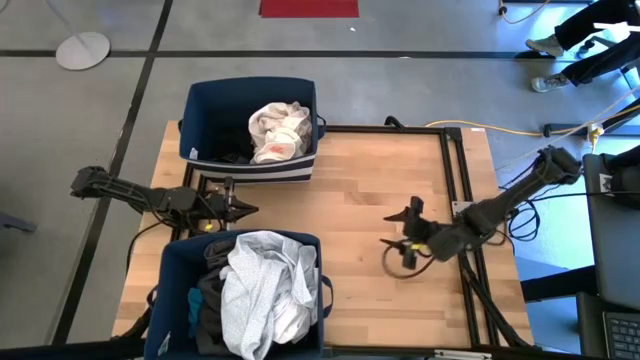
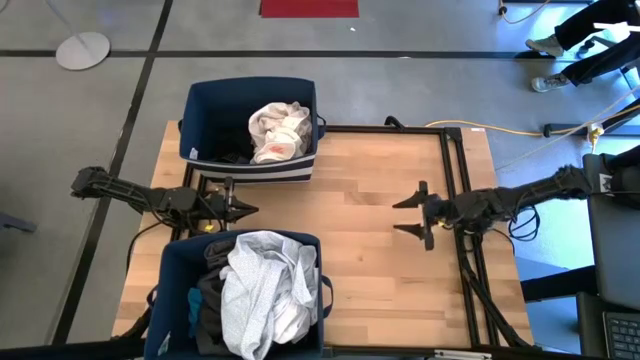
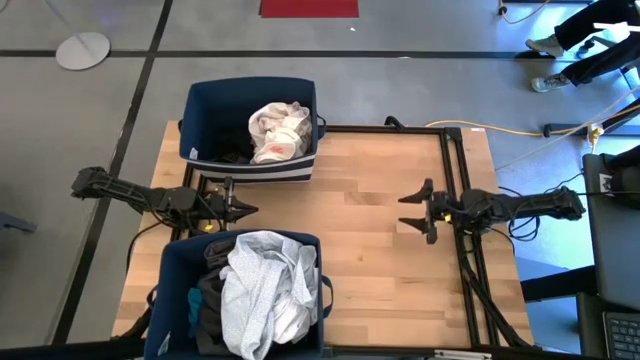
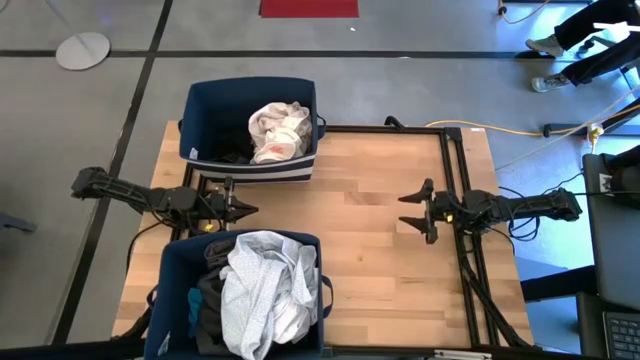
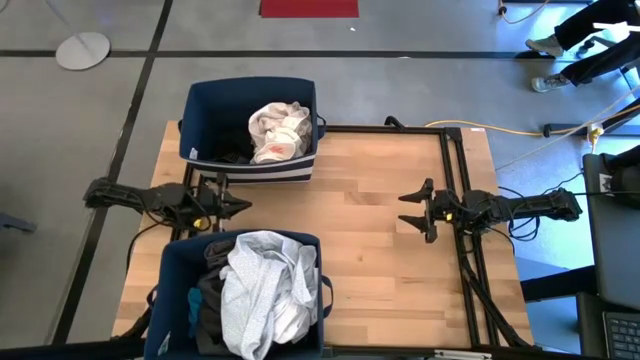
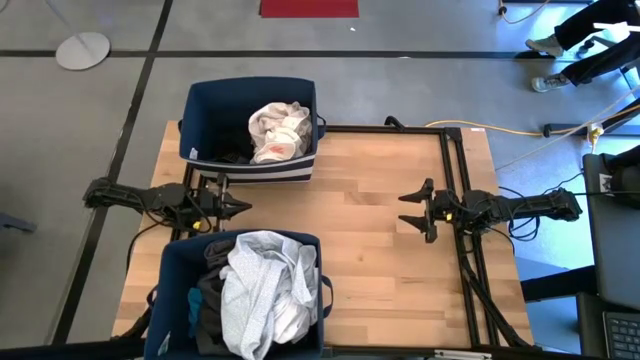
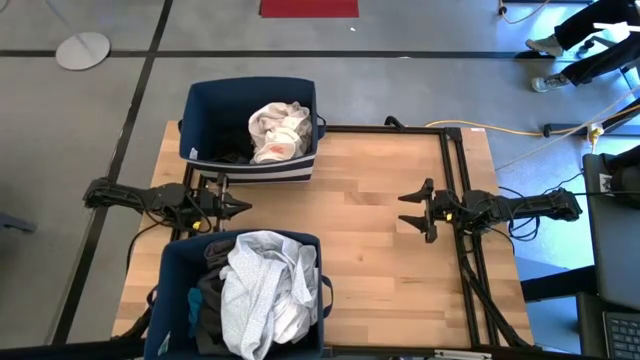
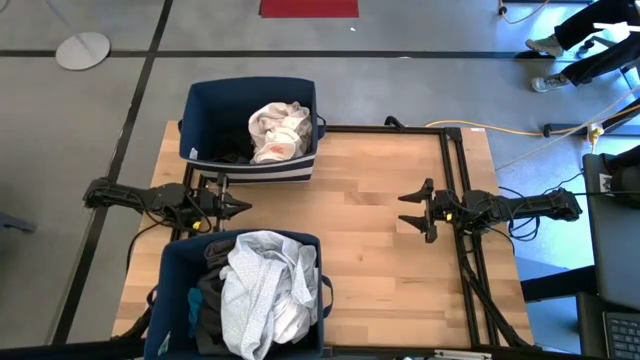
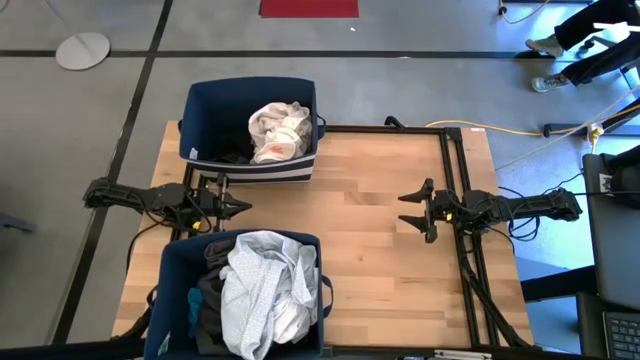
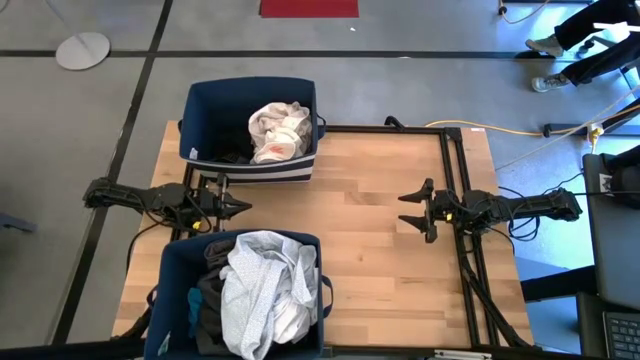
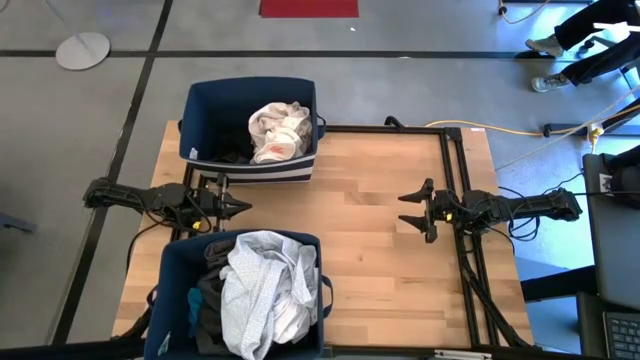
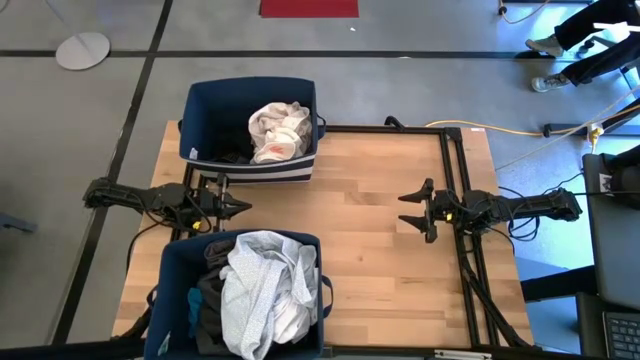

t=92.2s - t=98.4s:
Task: Sort clothes
Return to Home Position

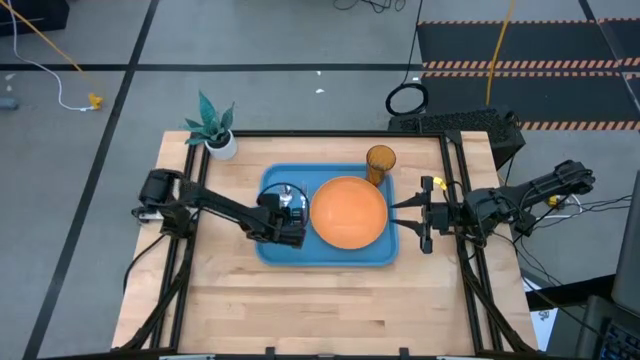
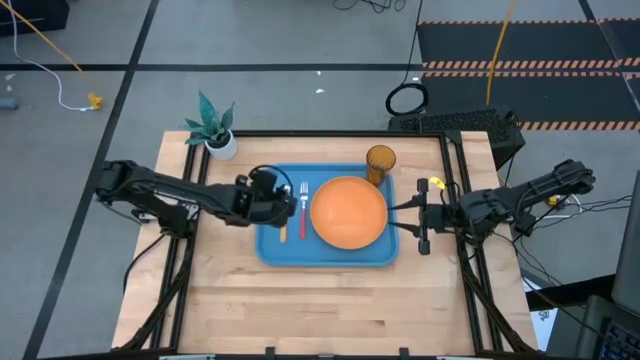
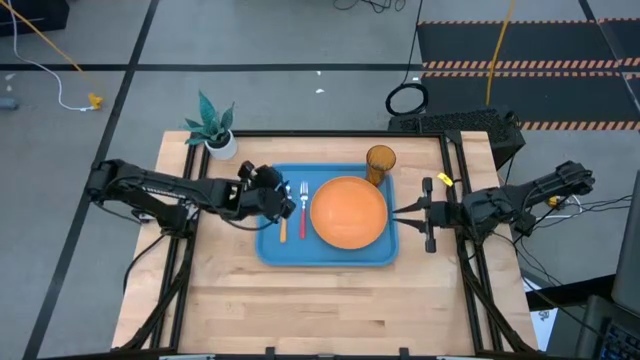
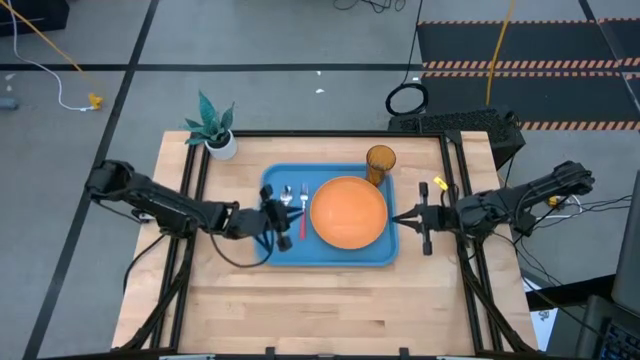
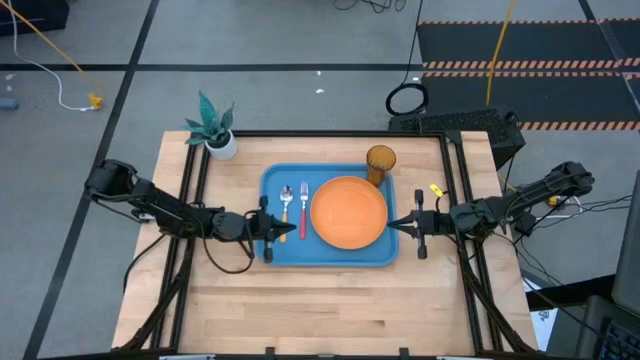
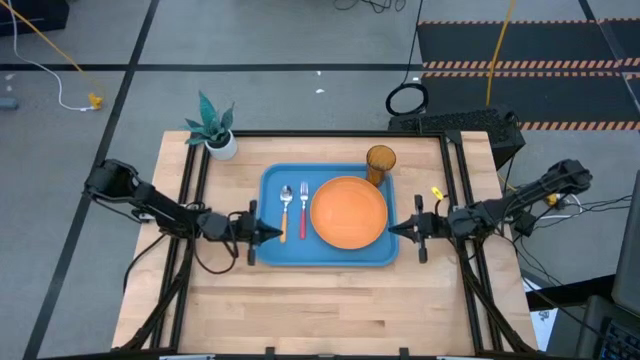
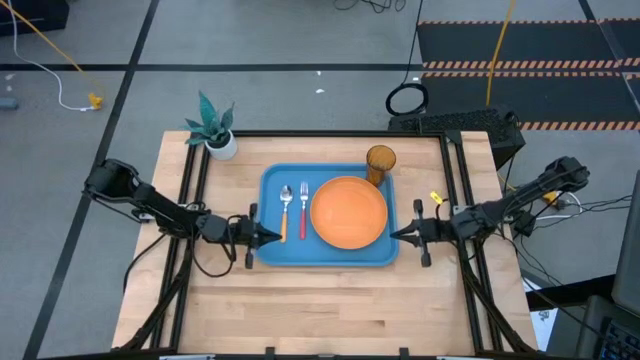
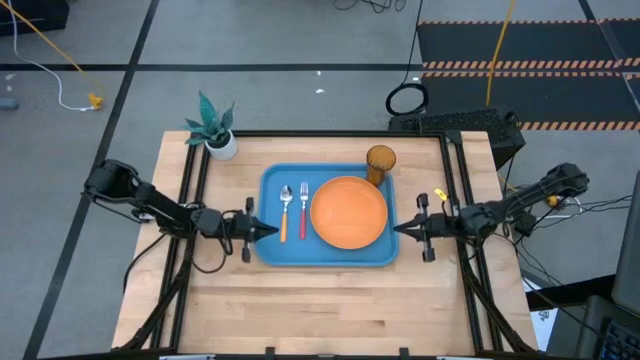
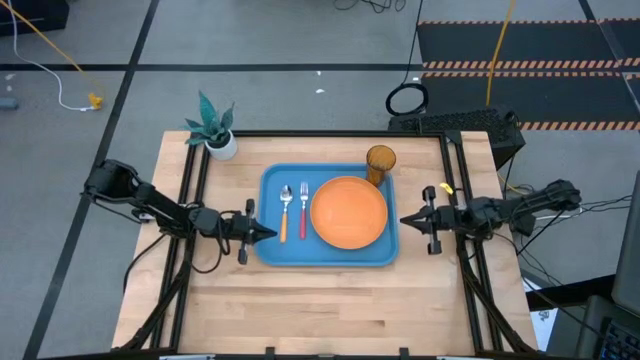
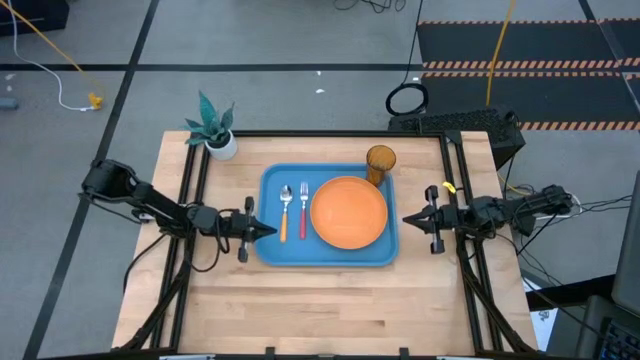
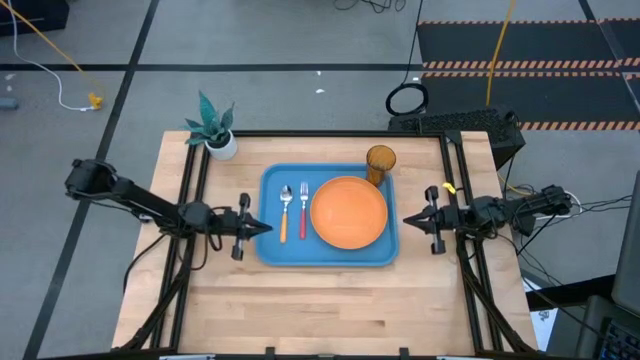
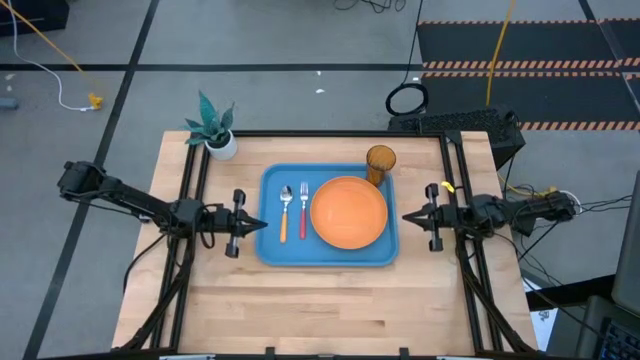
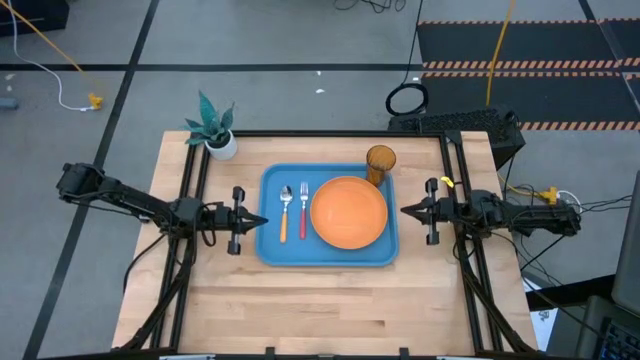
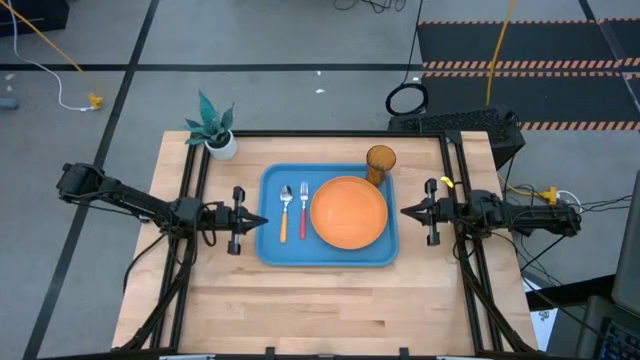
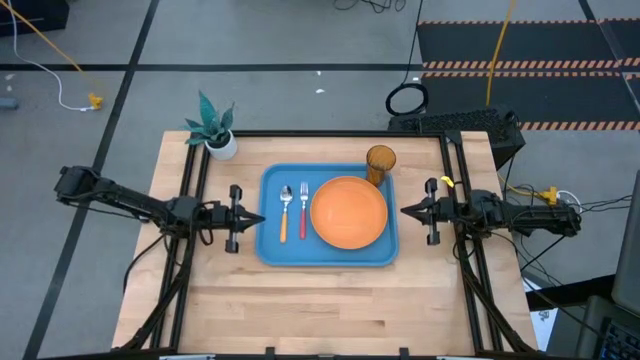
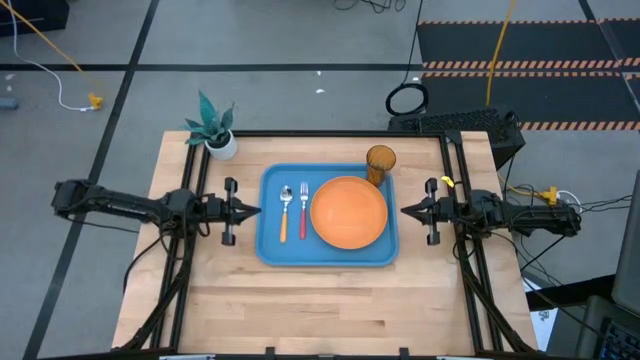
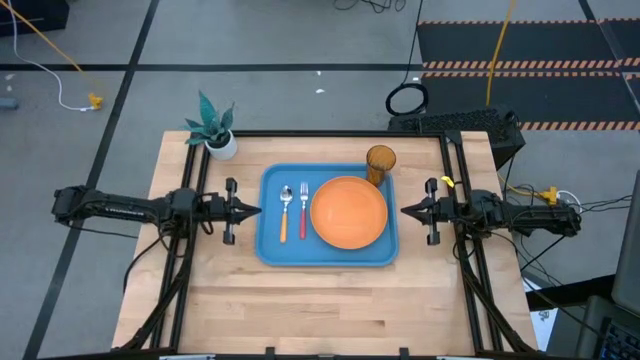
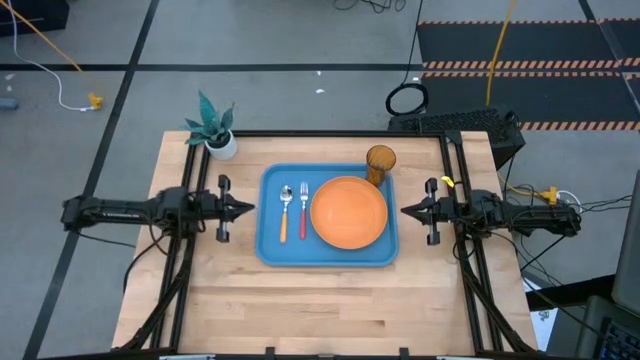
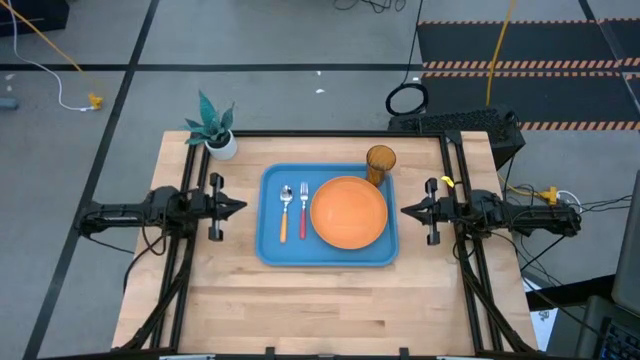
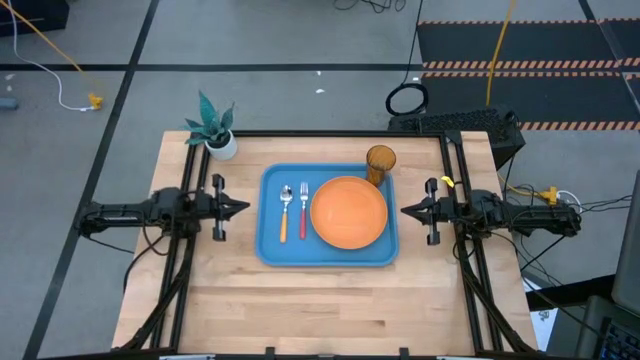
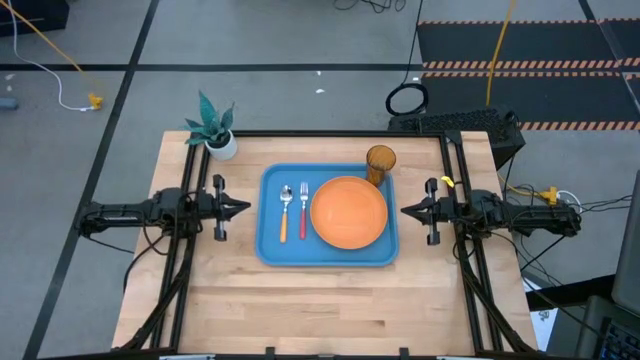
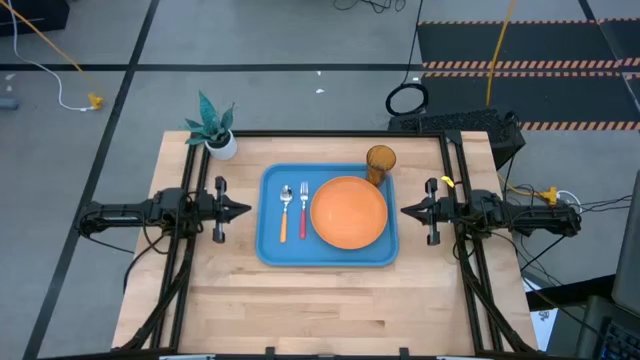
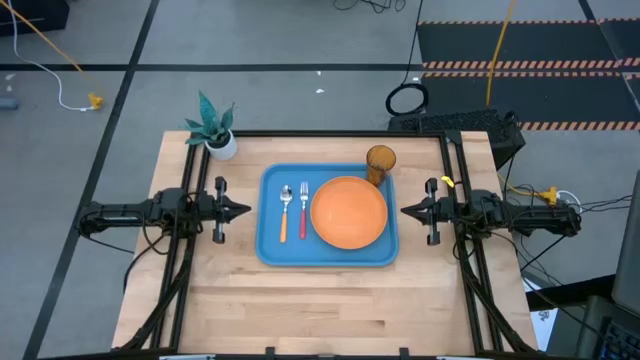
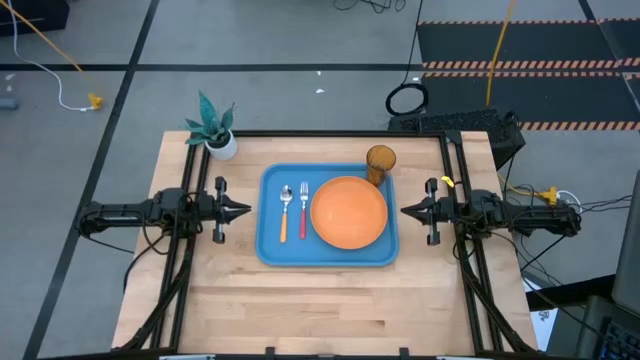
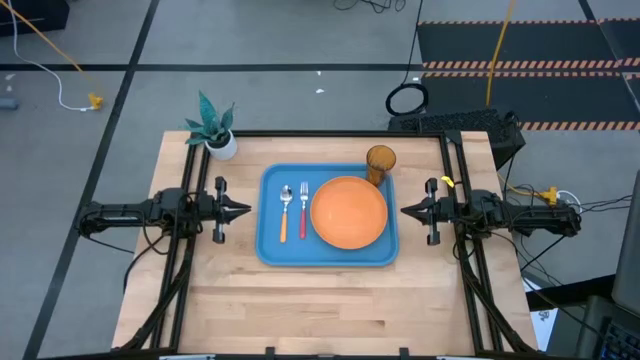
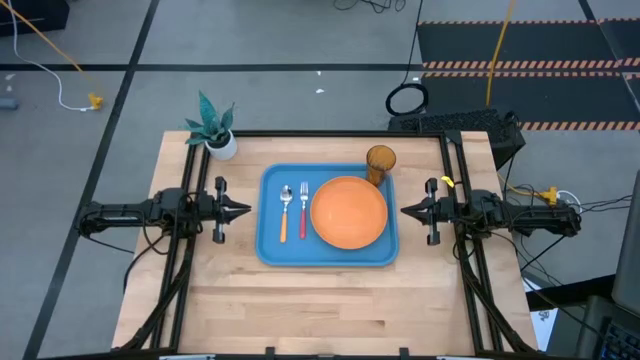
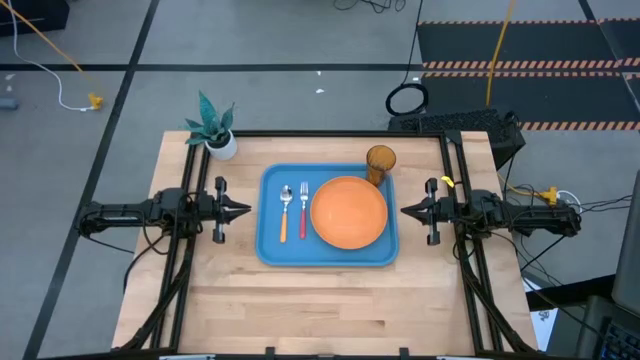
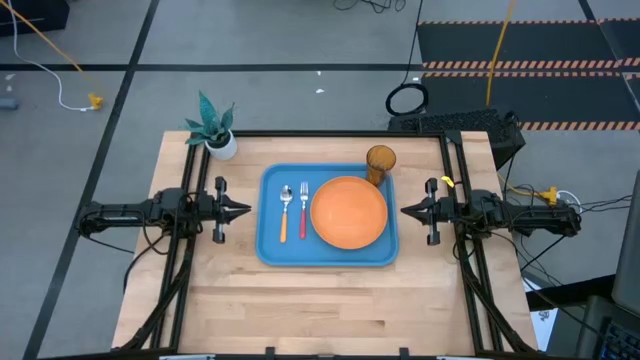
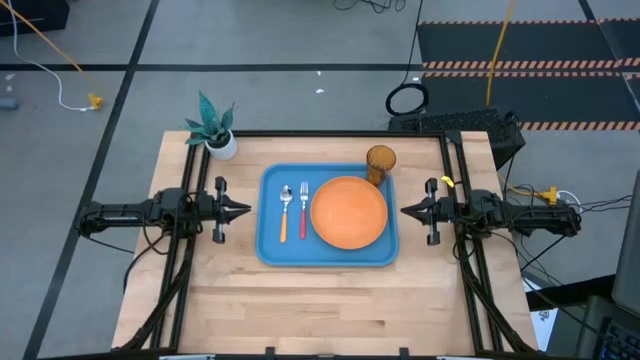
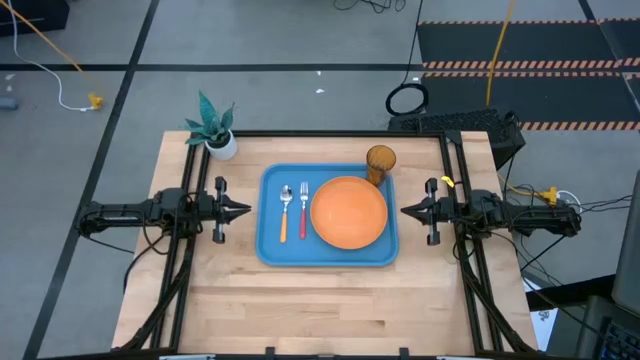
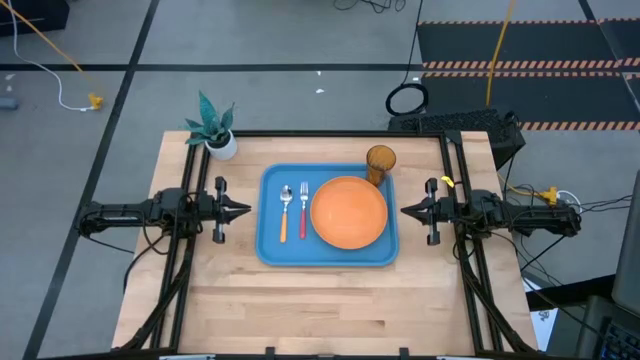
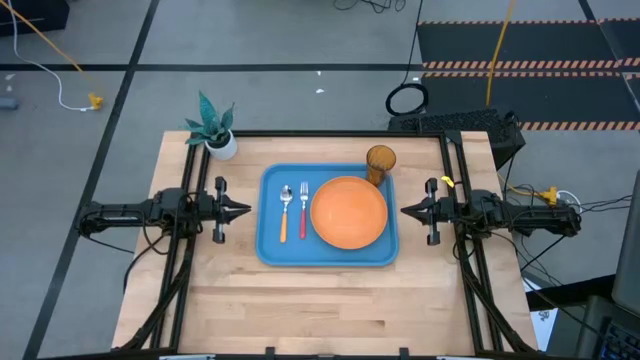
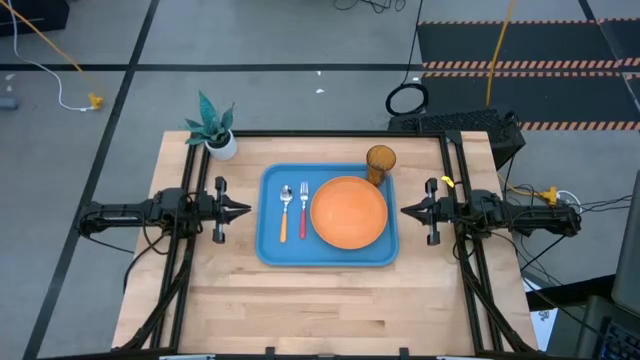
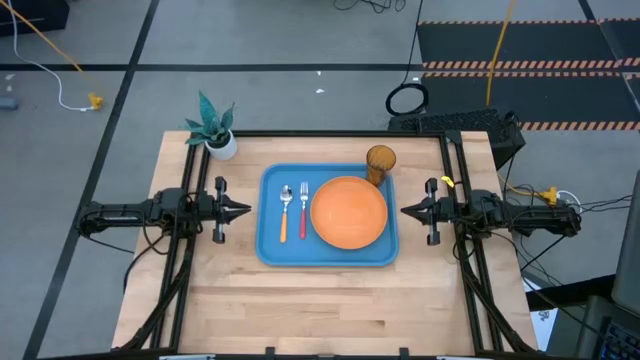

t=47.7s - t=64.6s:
Task: Pick and place plate/cup/fork/spoon on tray
Return to Home Position
